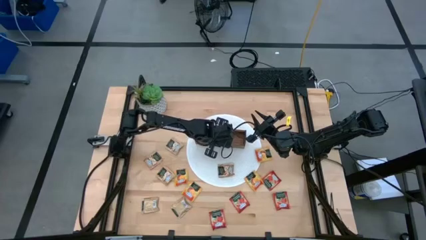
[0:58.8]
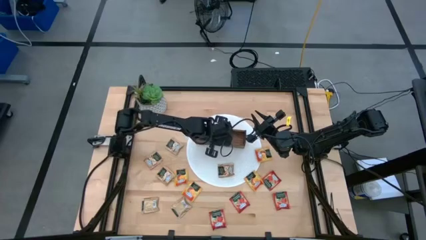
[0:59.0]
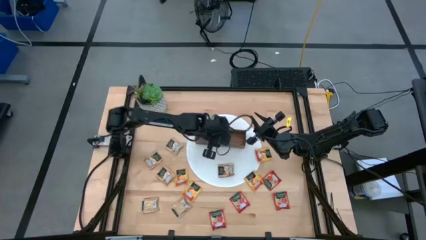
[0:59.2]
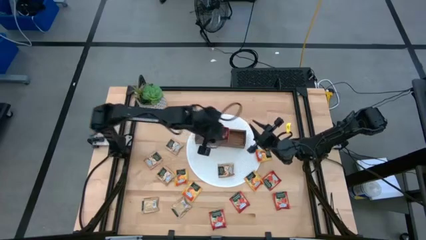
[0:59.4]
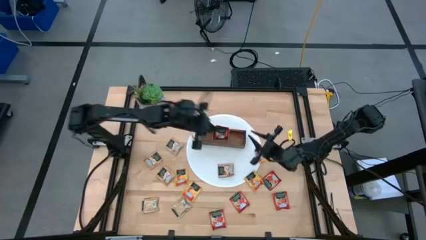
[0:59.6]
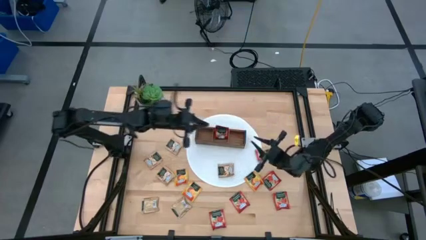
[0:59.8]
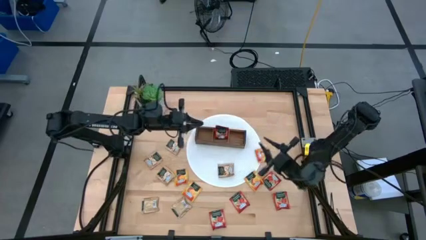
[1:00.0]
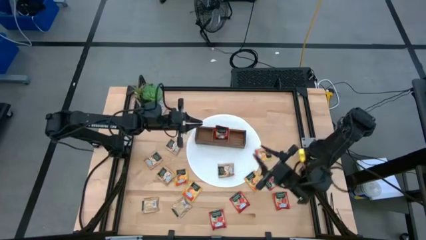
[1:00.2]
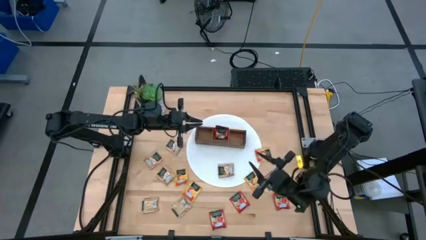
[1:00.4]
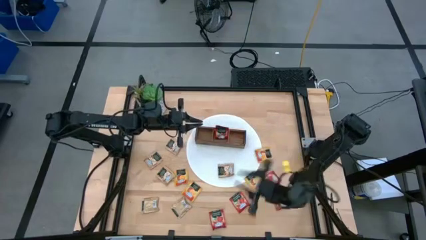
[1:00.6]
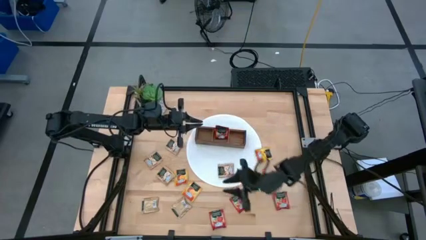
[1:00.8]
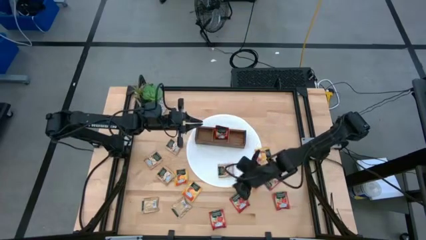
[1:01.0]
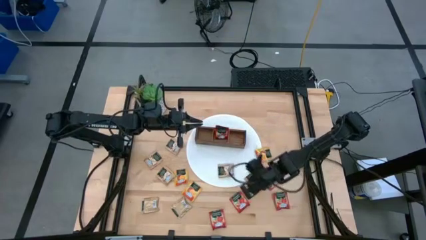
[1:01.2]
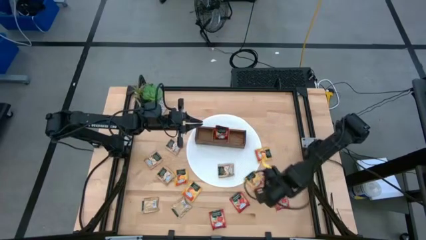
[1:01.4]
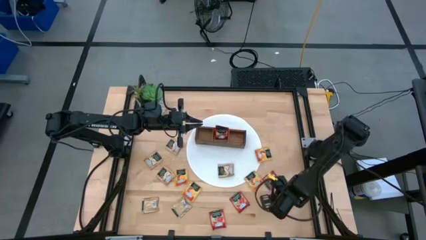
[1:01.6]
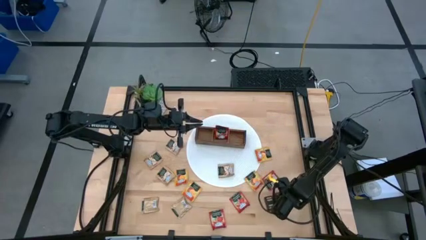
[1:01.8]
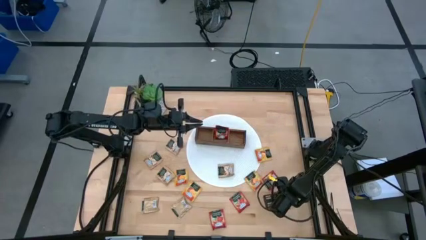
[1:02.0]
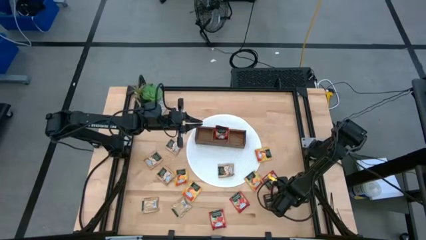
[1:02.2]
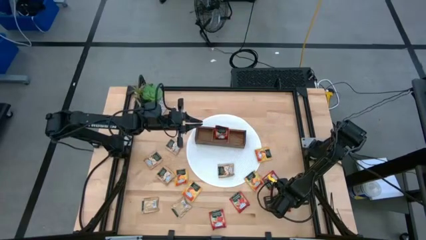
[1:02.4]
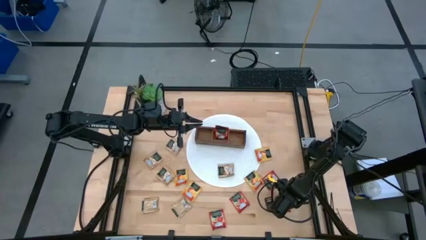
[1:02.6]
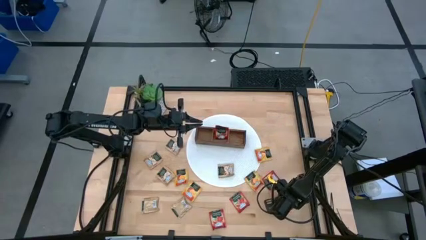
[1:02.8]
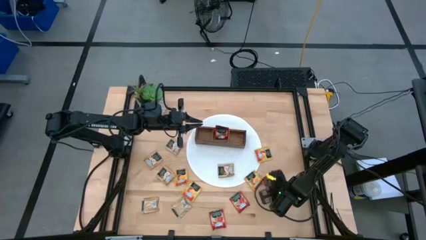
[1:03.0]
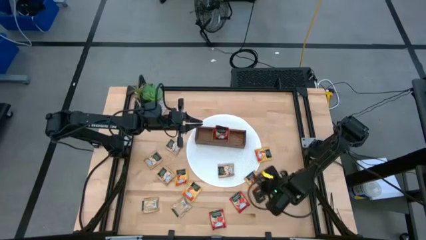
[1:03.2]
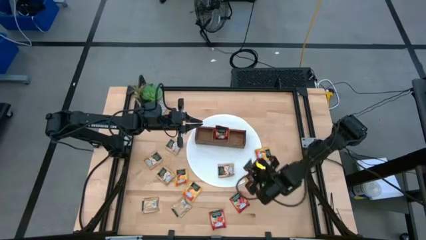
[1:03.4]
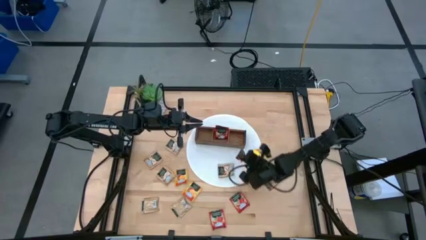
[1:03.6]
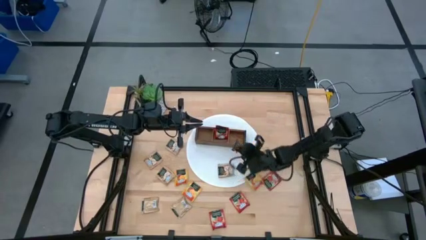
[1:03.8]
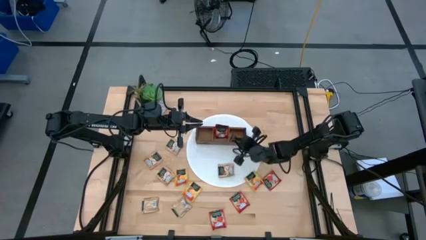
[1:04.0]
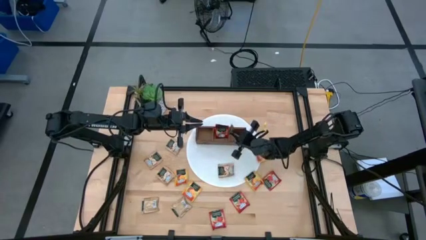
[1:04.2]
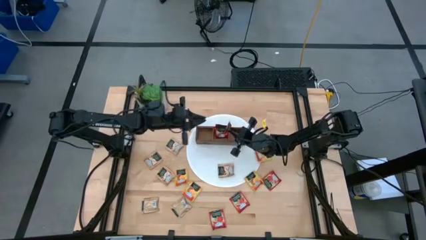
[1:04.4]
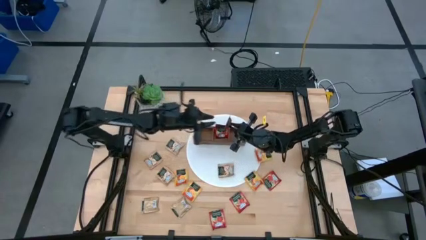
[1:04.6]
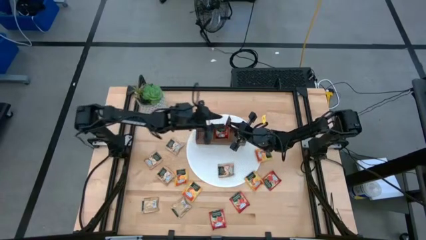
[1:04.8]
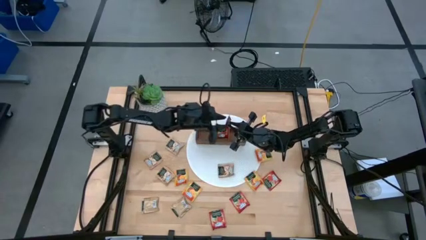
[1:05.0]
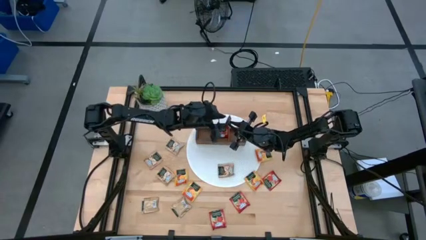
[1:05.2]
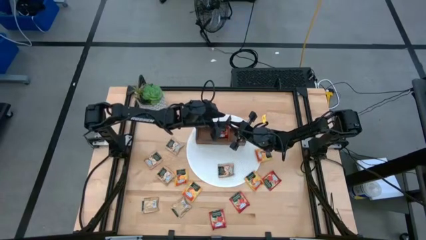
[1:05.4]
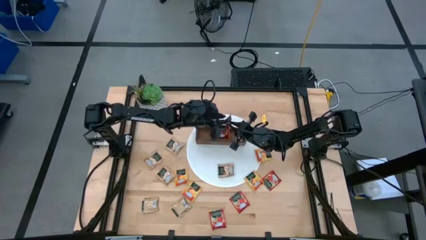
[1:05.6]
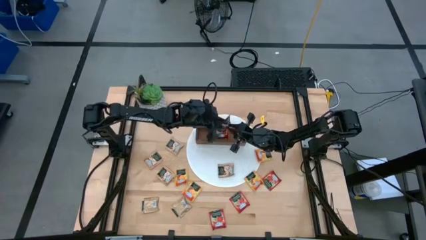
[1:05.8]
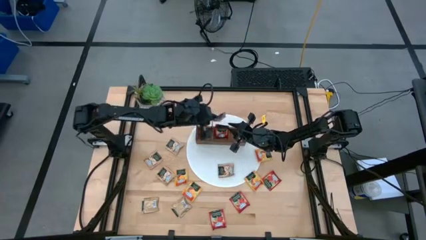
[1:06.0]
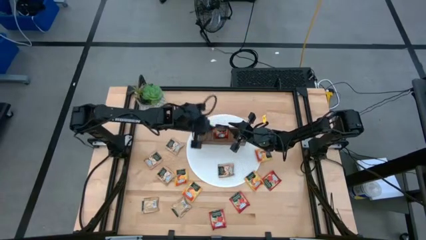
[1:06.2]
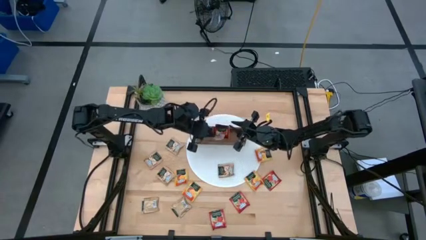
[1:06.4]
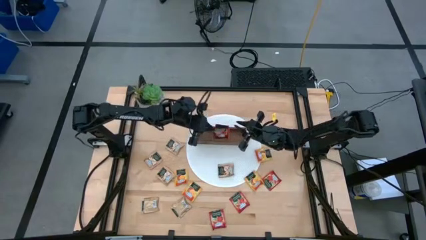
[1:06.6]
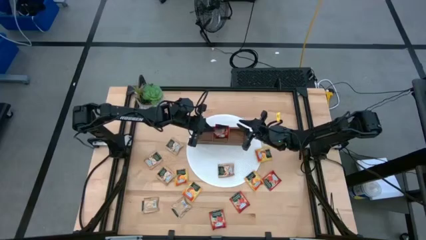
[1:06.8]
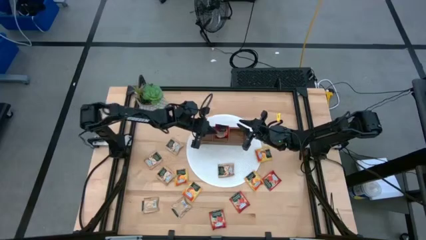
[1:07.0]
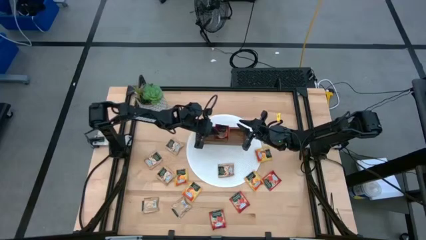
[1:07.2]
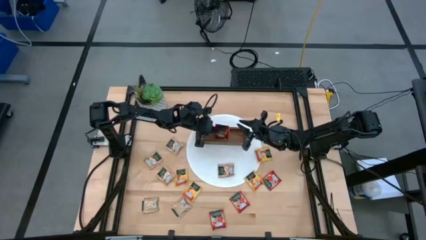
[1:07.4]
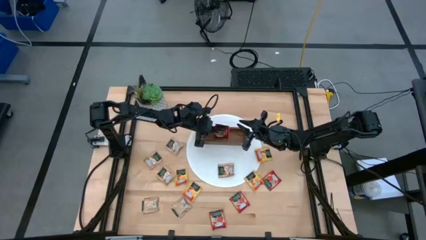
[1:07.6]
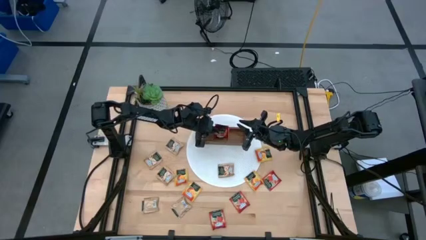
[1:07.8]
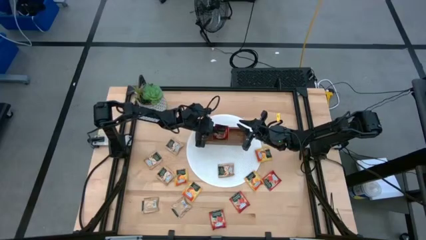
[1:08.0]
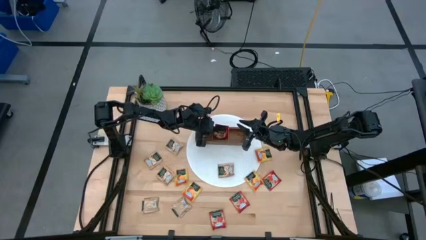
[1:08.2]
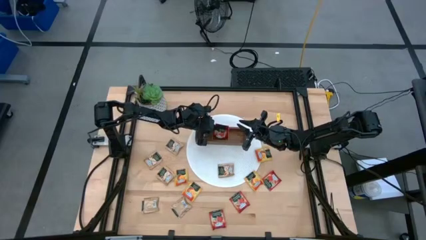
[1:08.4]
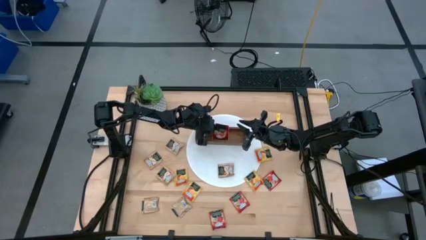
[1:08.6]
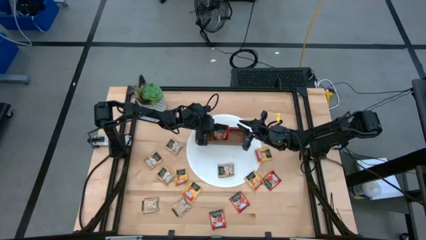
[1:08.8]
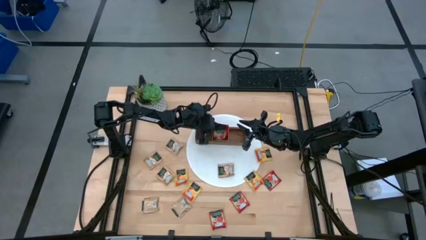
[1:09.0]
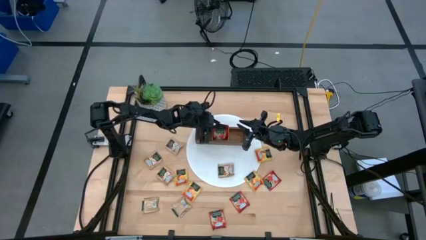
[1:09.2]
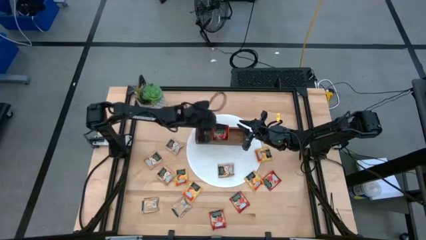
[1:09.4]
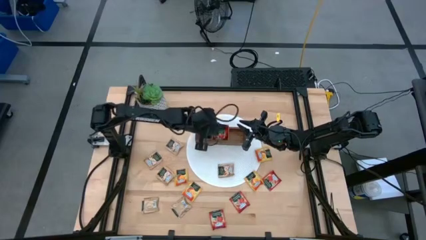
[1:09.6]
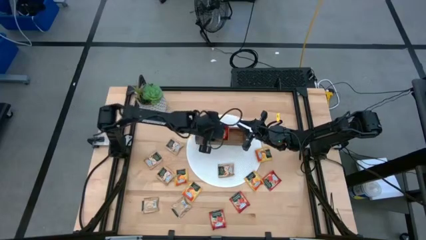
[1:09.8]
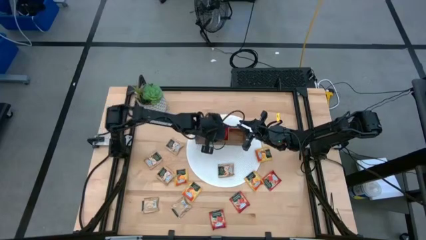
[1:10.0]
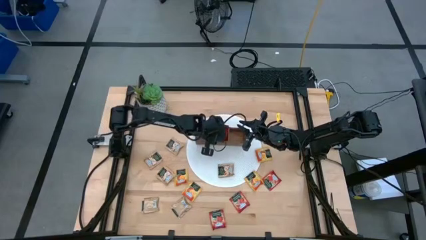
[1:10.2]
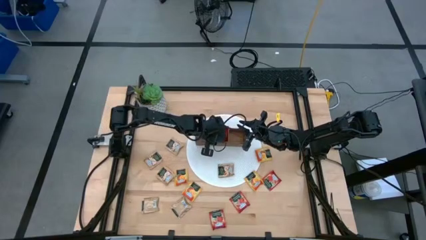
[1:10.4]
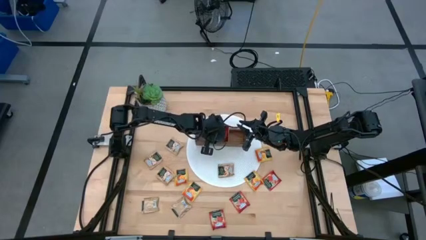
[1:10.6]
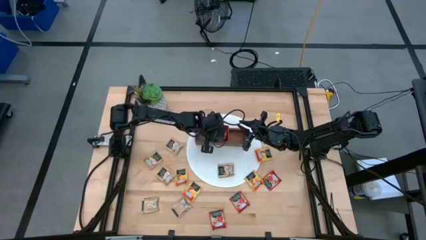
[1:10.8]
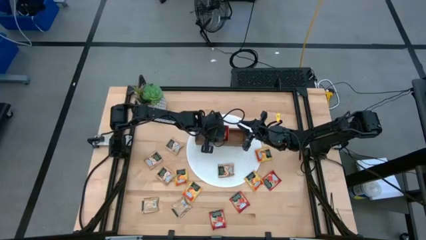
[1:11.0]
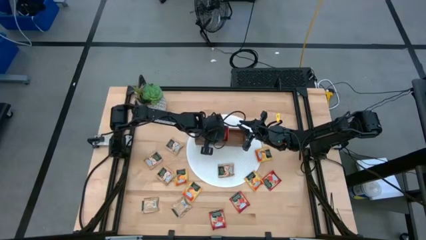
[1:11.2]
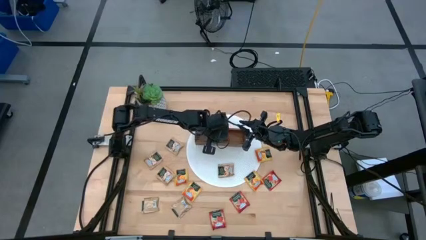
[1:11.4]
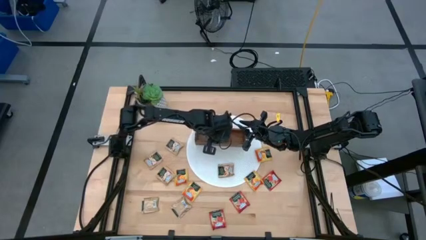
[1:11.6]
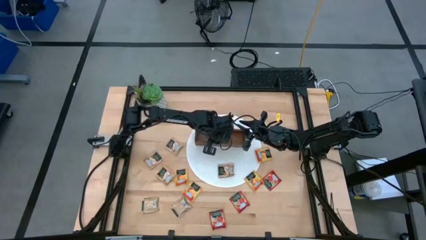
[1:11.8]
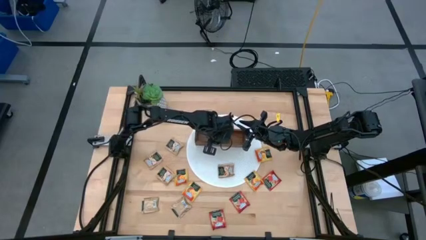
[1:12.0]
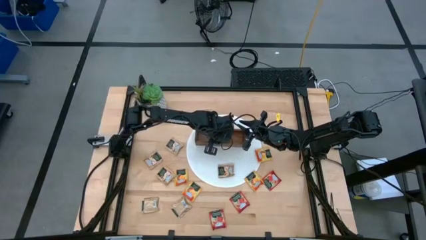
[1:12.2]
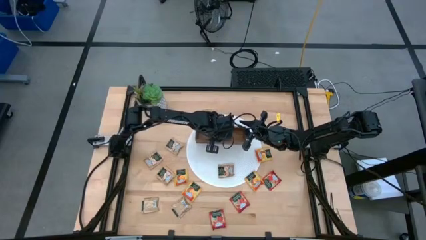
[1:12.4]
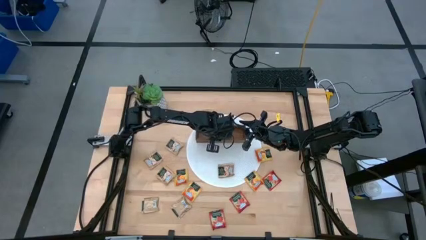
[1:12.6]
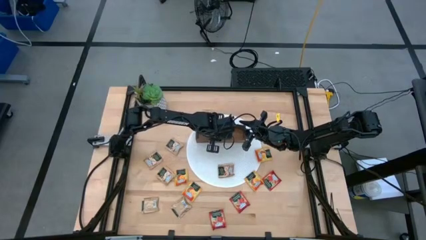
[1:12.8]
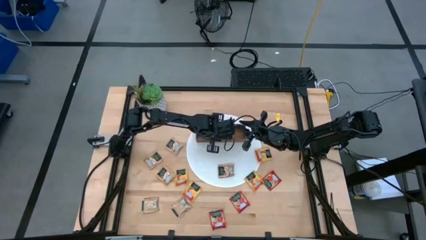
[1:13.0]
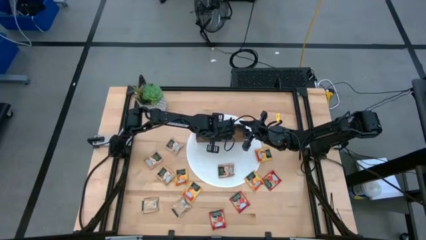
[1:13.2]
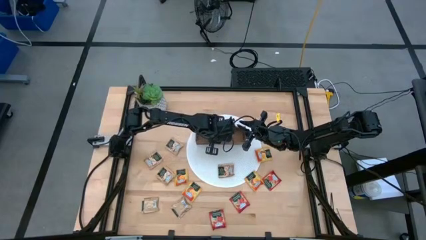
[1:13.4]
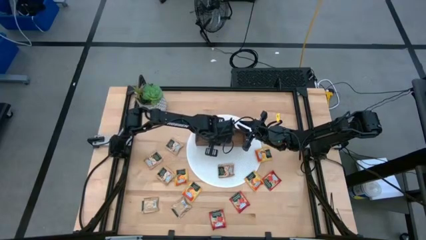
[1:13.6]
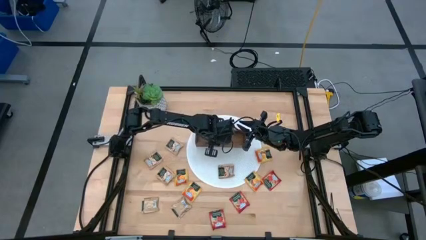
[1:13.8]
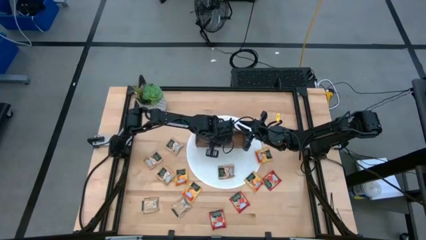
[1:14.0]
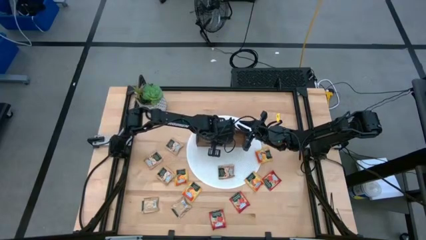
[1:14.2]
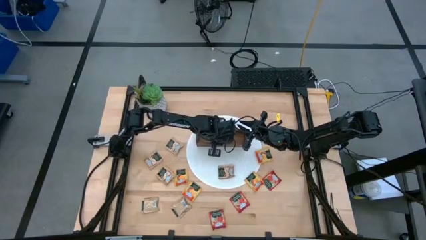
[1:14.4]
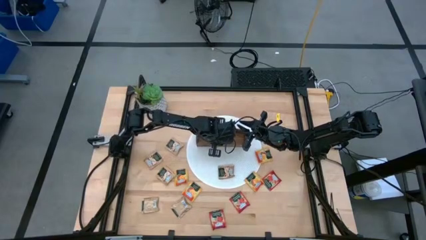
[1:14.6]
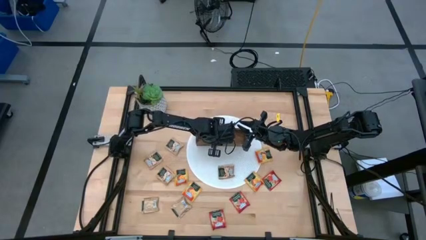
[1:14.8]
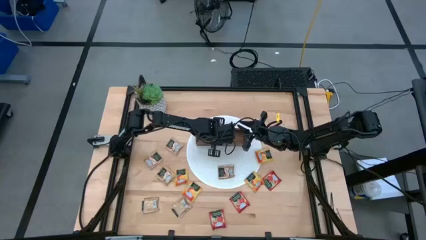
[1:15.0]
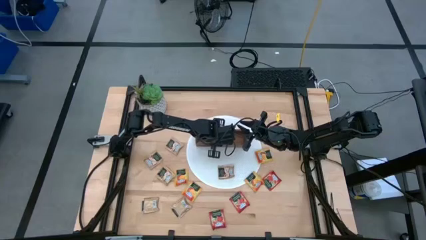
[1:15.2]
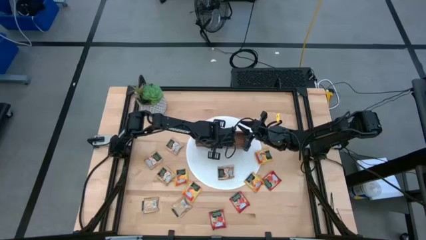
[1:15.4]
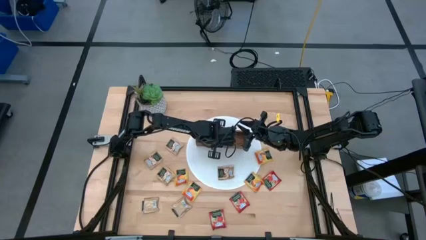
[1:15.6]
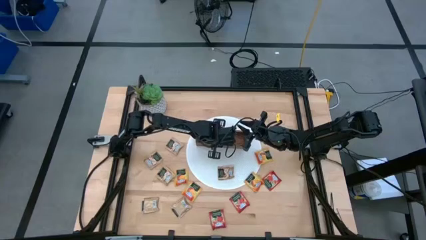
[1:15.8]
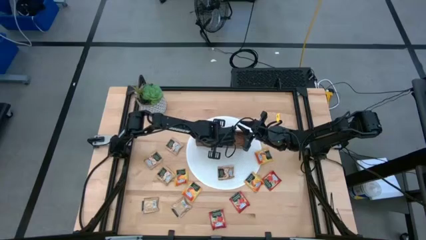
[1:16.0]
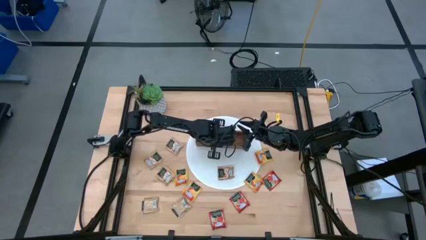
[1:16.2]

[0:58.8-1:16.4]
Task: Pick & Place Tea
Put the red tea bag into the middle section of the wooden organizer
